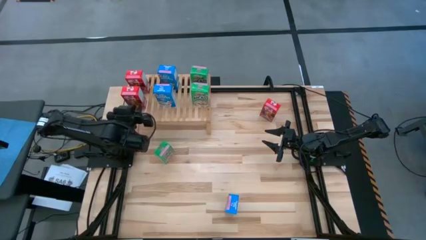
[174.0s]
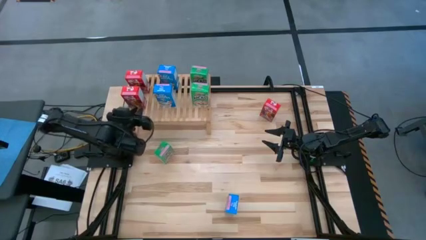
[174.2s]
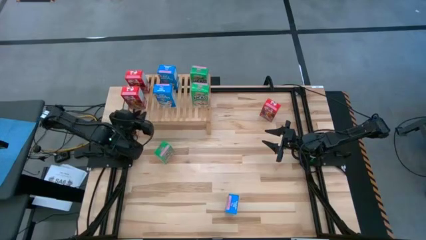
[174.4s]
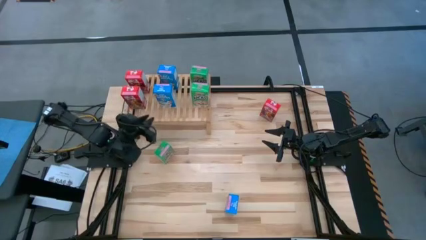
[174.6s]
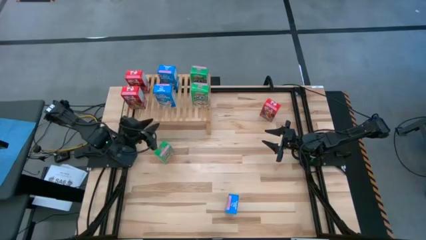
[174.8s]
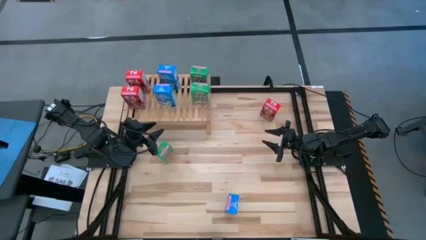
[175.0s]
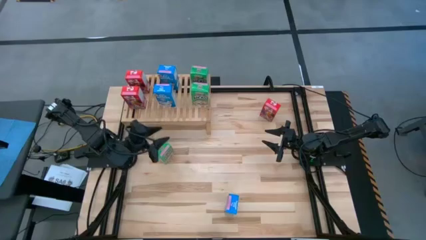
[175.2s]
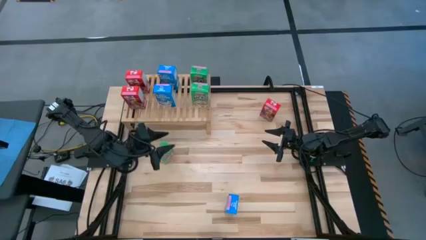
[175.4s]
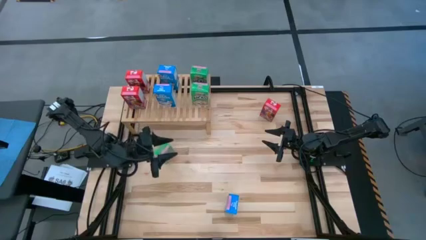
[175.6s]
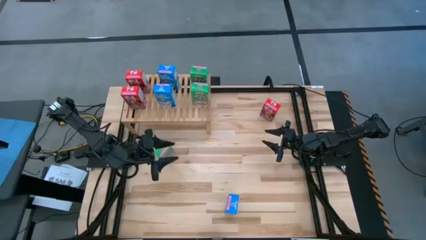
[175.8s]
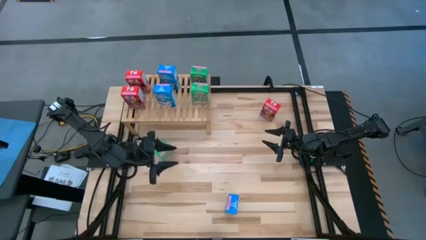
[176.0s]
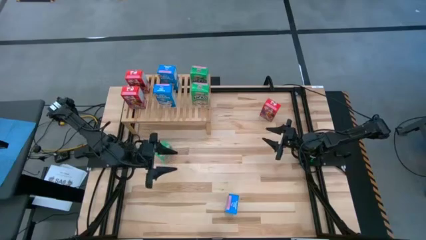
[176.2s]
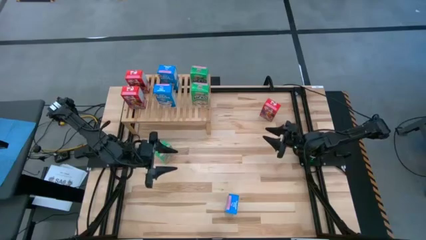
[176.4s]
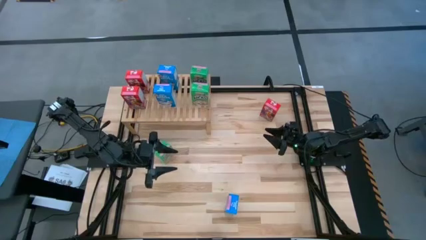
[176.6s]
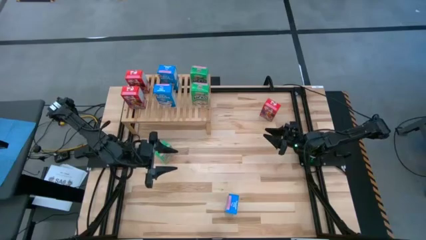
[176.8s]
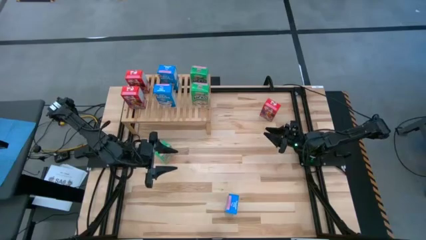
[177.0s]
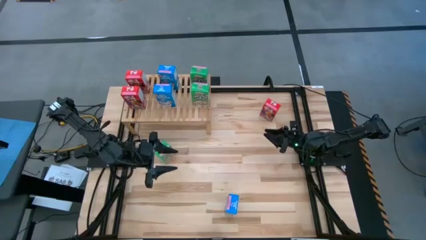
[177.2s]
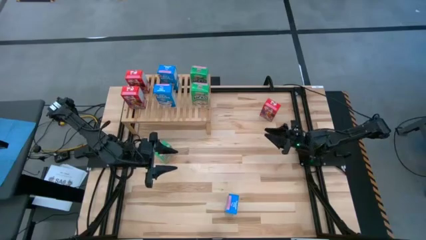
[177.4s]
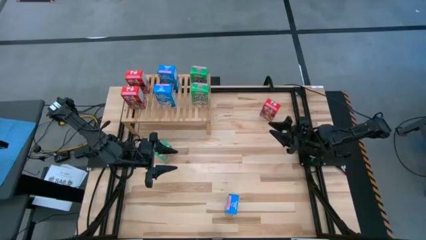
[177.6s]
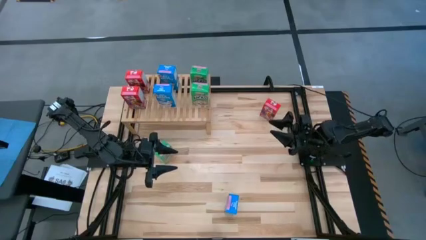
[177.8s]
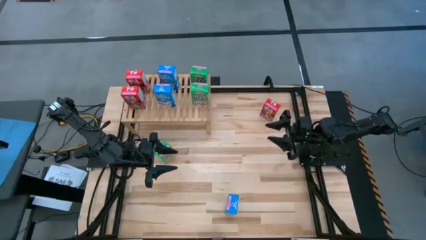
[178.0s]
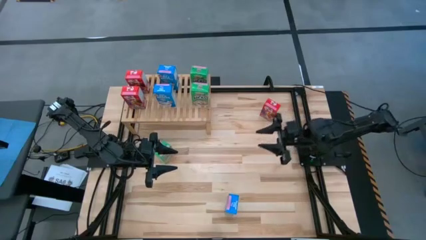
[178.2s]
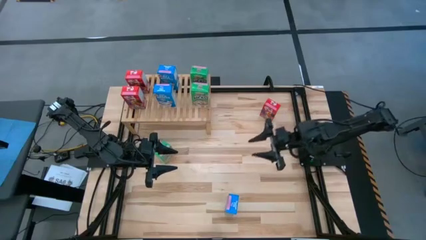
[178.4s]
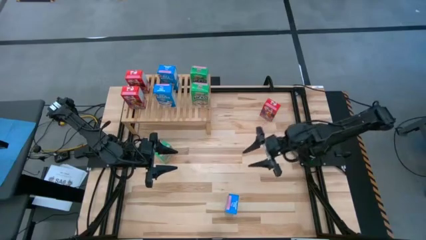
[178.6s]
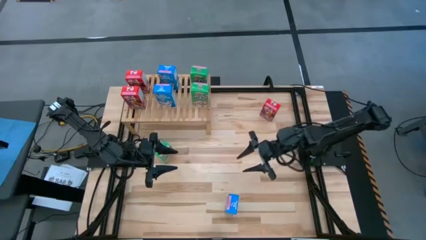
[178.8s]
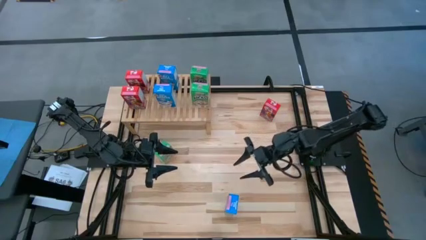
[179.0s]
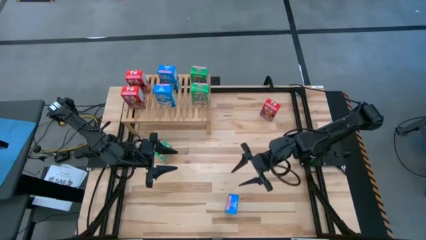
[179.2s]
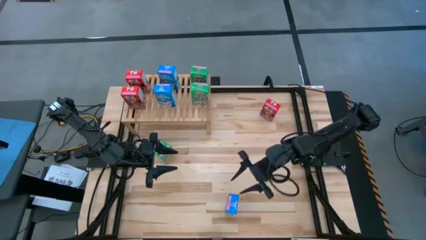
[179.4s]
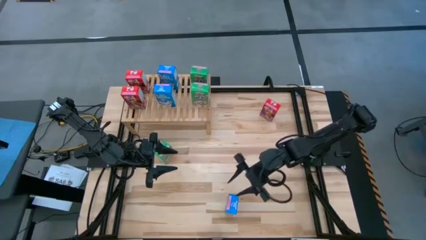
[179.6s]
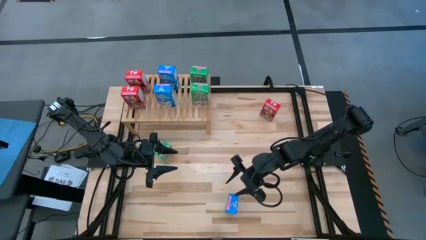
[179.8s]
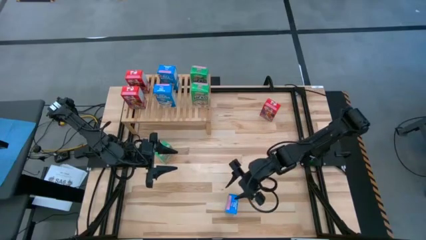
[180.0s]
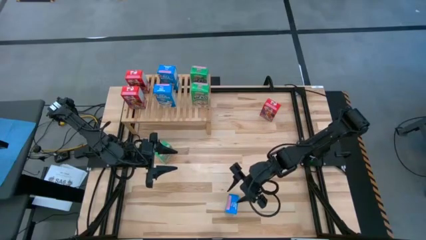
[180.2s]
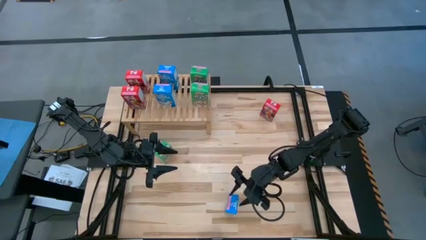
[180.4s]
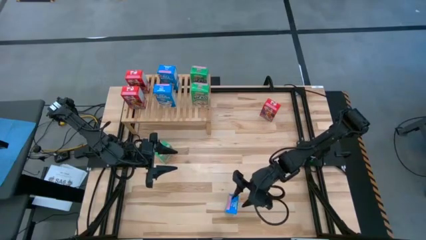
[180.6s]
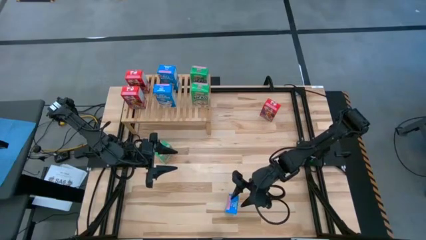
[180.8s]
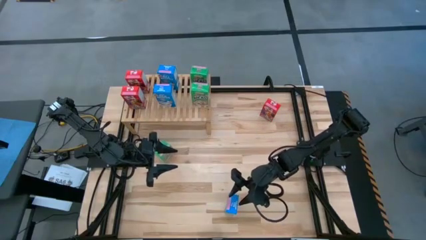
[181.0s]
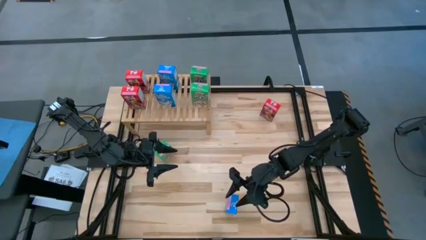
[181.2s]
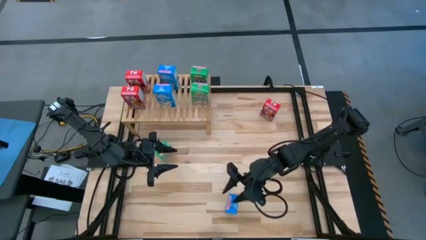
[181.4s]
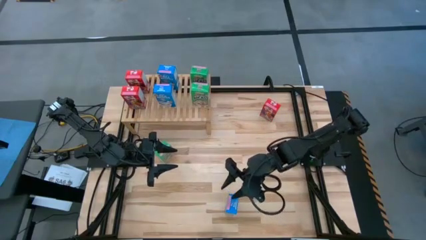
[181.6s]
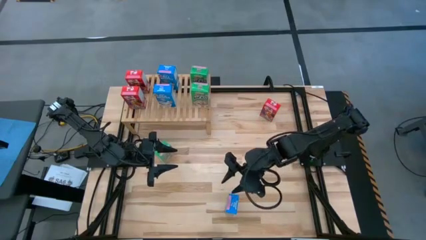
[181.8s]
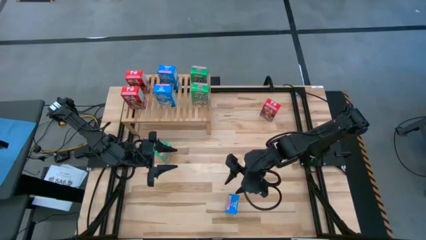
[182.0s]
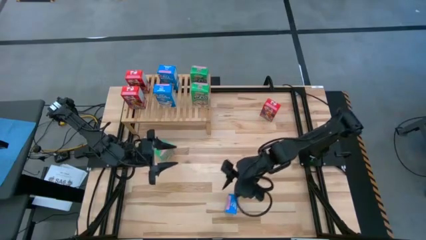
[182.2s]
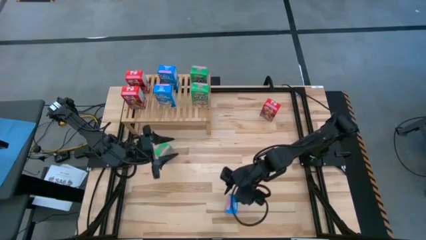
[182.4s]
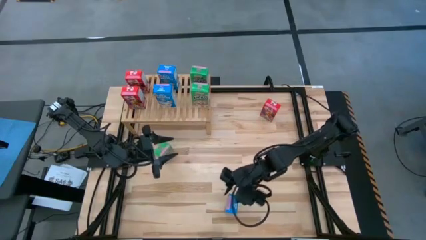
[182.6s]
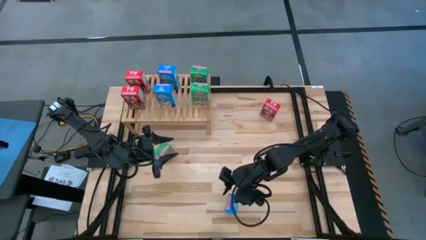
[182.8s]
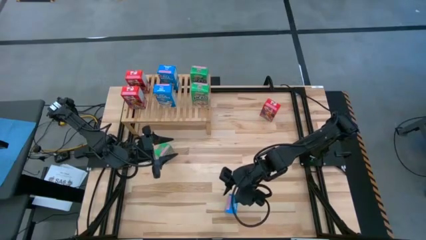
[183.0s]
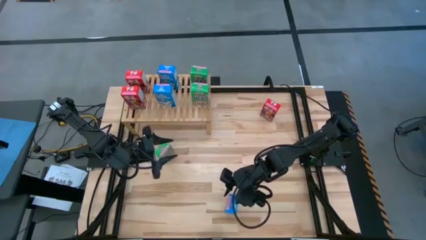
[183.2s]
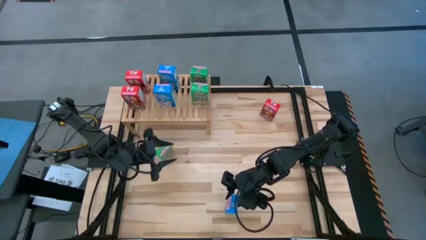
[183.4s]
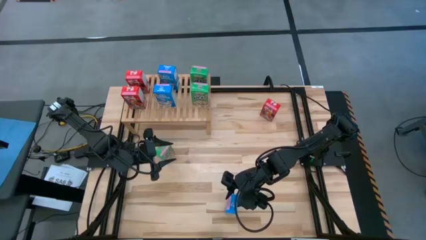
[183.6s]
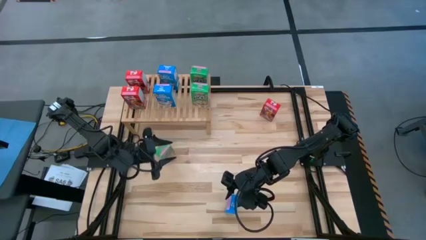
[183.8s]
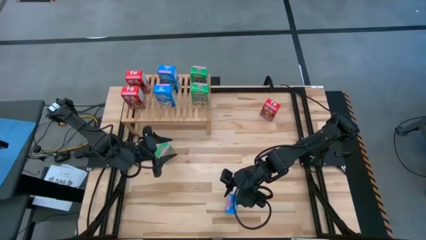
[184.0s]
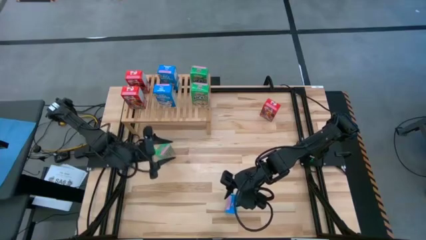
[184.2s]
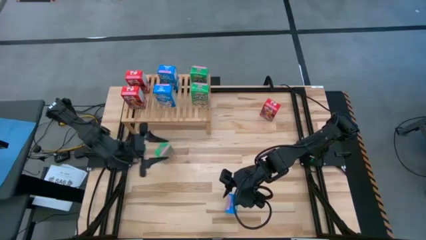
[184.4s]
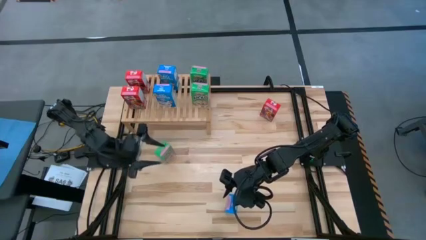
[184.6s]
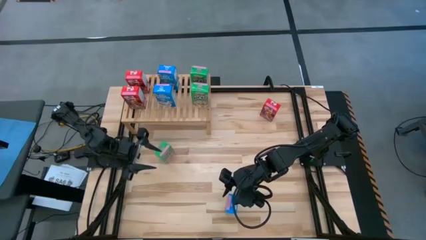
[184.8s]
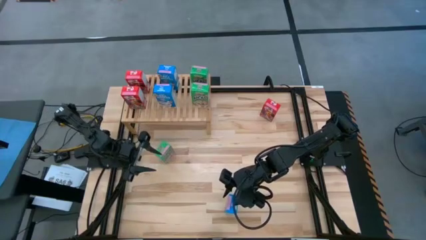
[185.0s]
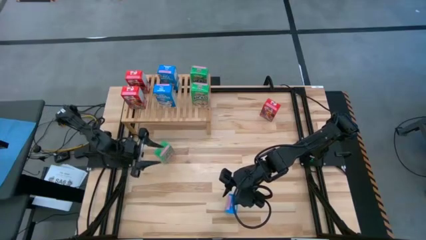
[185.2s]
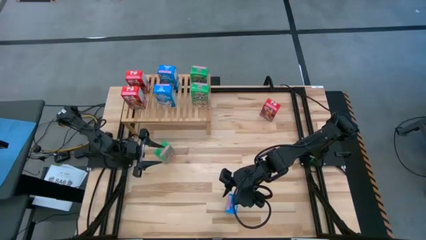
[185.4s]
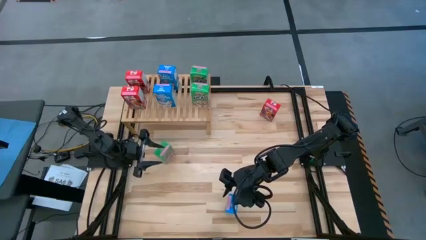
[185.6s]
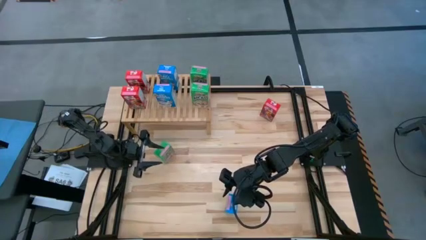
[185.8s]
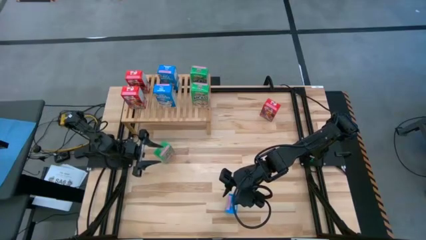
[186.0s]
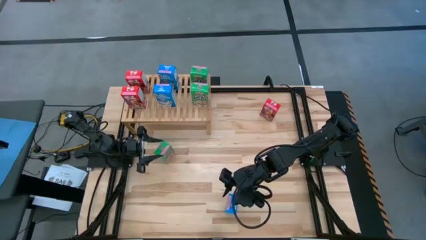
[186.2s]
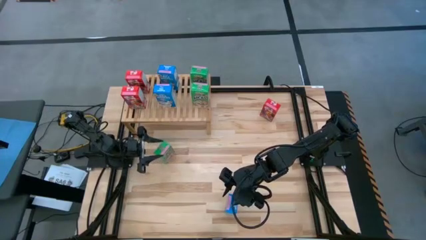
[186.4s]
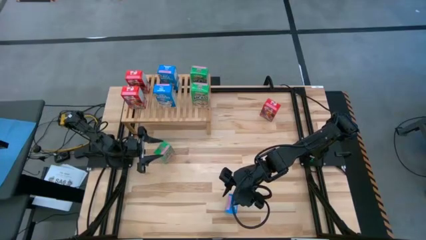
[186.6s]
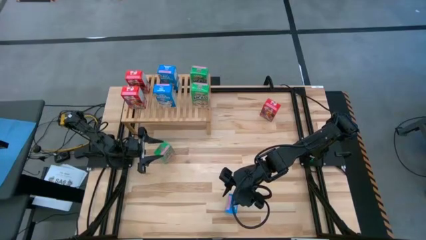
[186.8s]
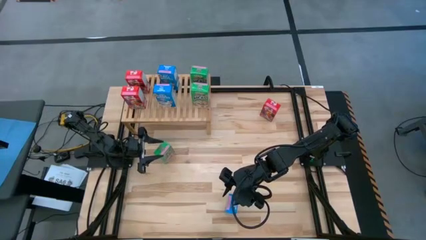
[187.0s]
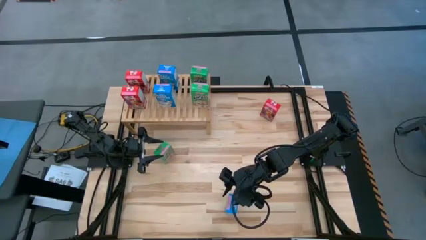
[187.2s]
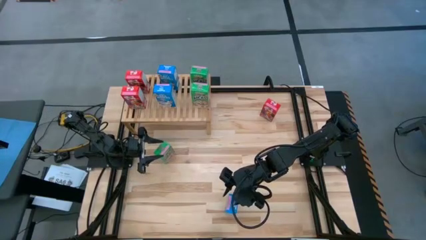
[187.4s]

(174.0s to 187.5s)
Task: Stack cereal on shelf
Put the blue cereal box on the shelf aligned with the blue cereal boxes

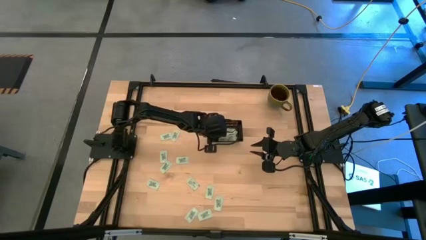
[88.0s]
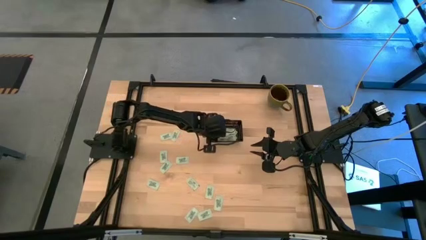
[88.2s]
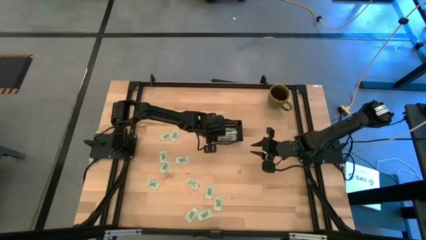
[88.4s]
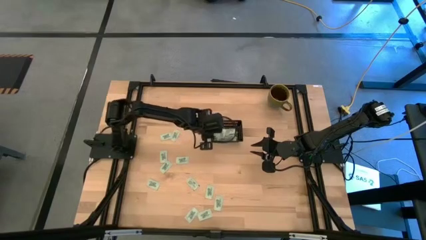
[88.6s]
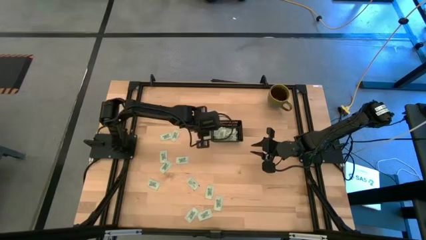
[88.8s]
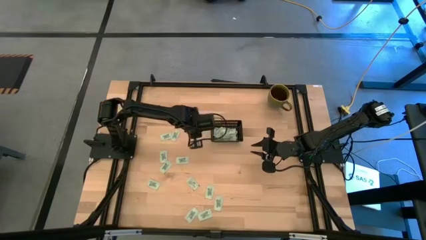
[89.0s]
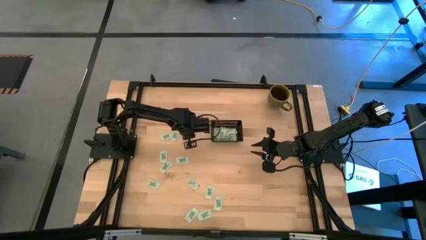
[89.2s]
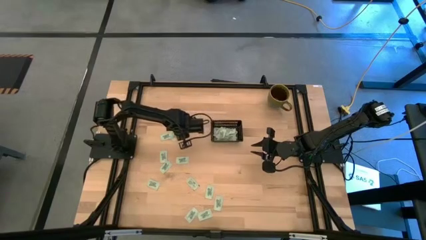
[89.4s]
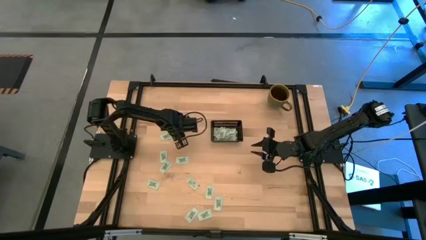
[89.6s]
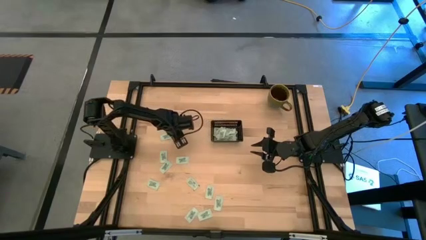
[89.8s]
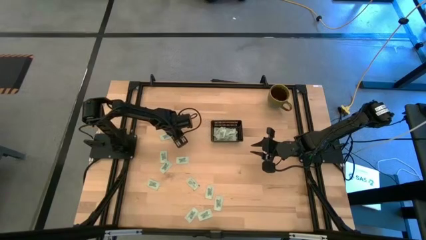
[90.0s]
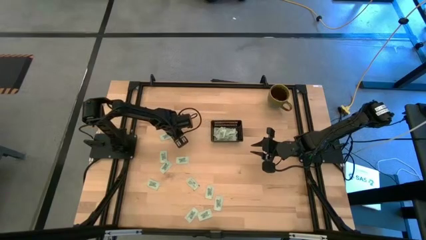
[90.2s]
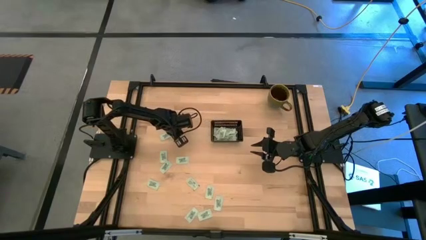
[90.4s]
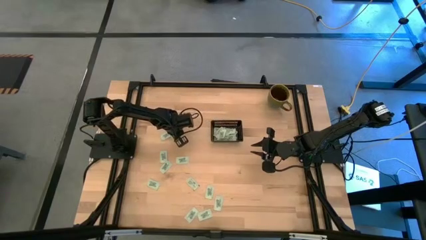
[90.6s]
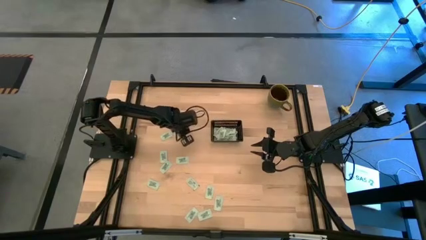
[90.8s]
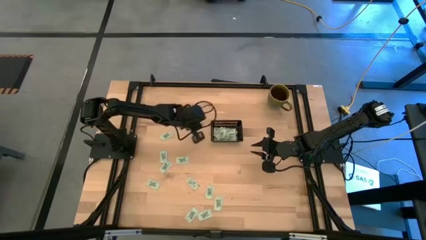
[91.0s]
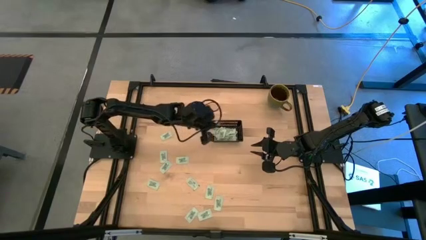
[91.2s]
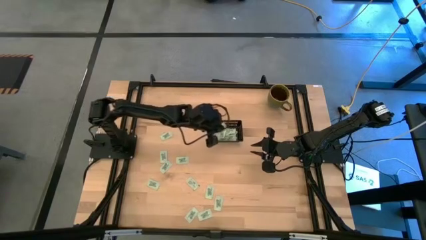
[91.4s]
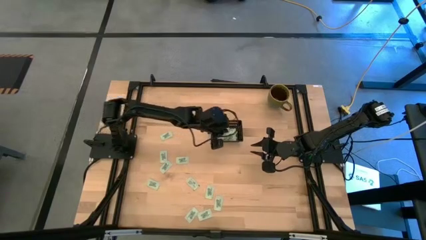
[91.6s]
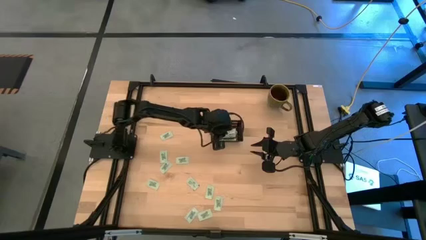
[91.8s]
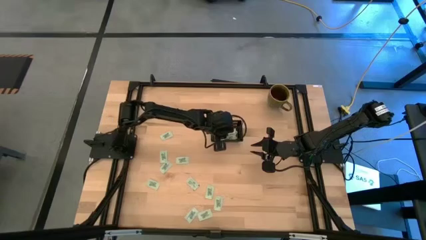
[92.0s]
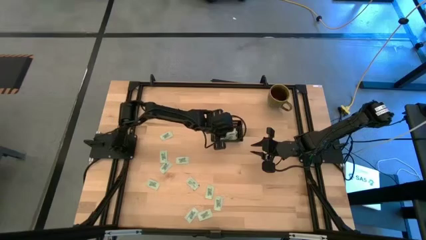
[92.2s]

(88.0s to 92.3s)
Task: Pick and place Stevia / Truvia into bins
Put the stevia packet into the black basket
